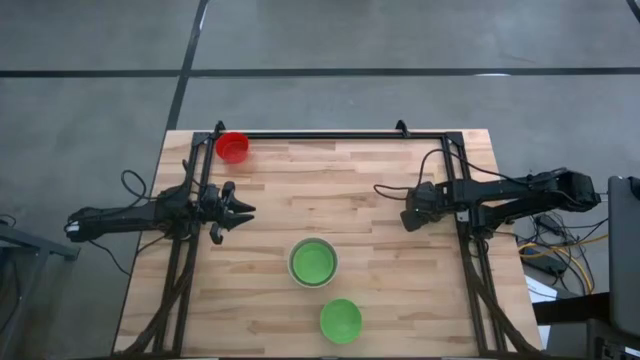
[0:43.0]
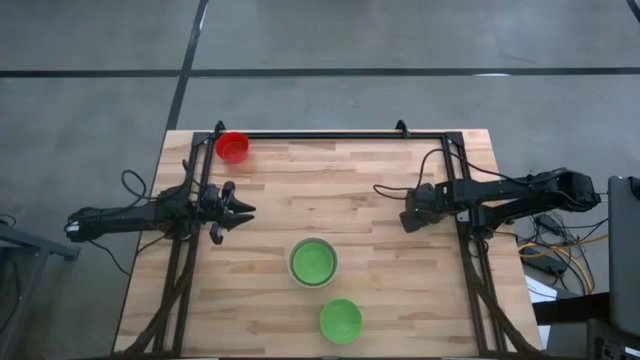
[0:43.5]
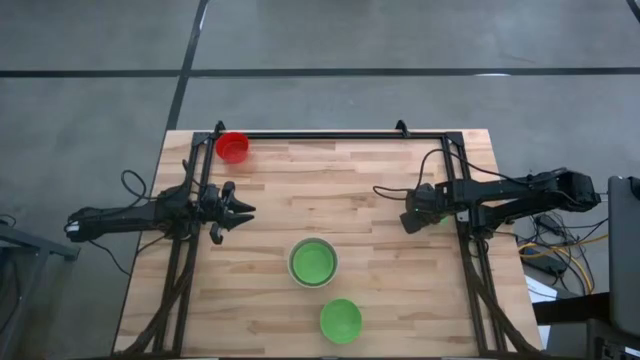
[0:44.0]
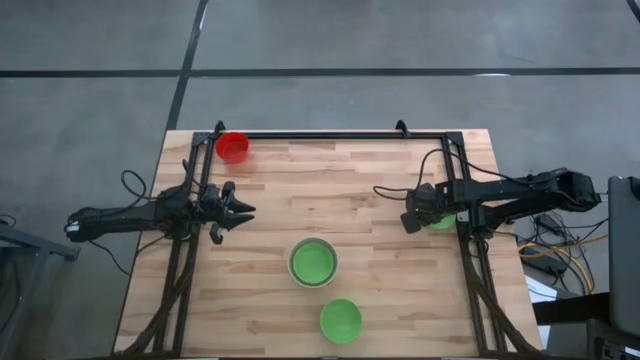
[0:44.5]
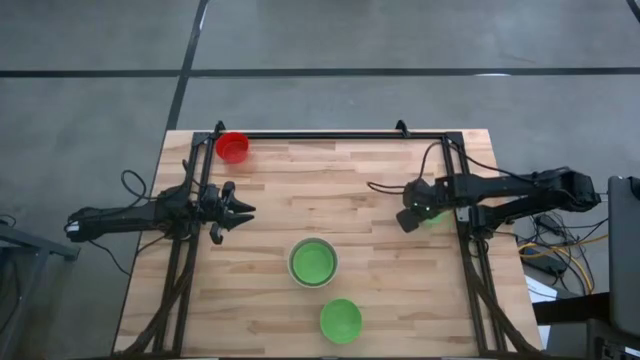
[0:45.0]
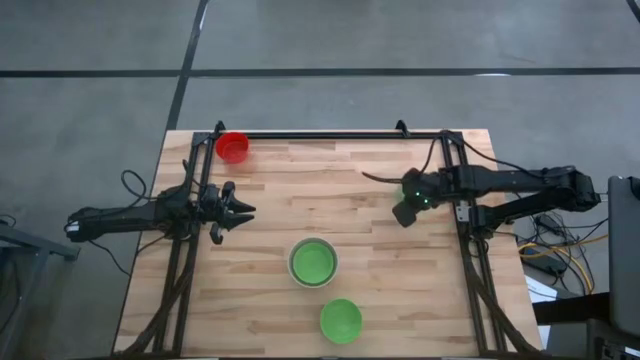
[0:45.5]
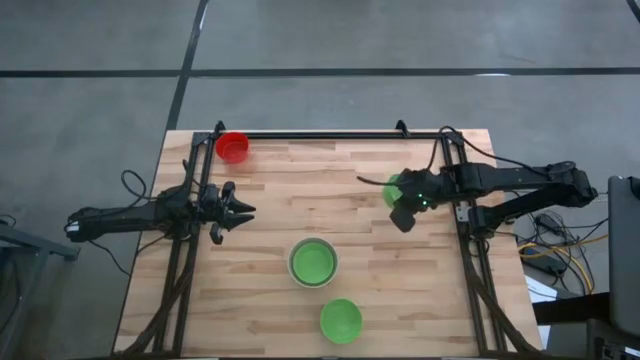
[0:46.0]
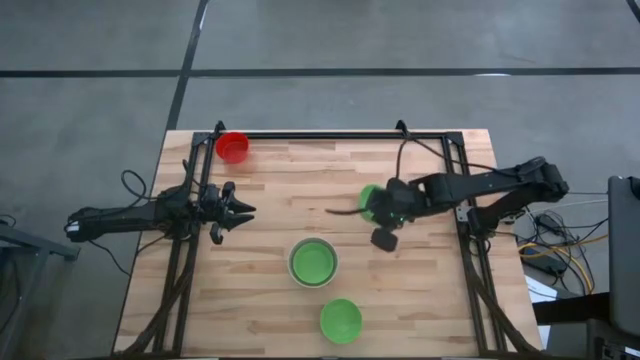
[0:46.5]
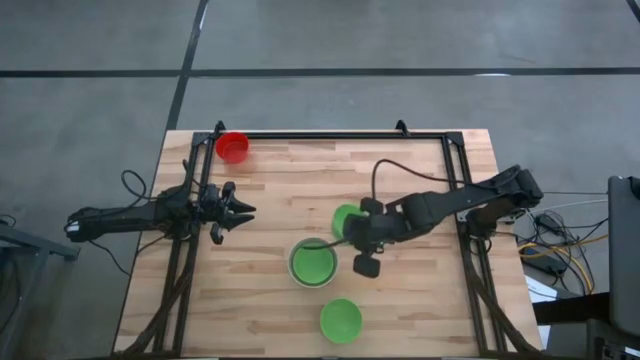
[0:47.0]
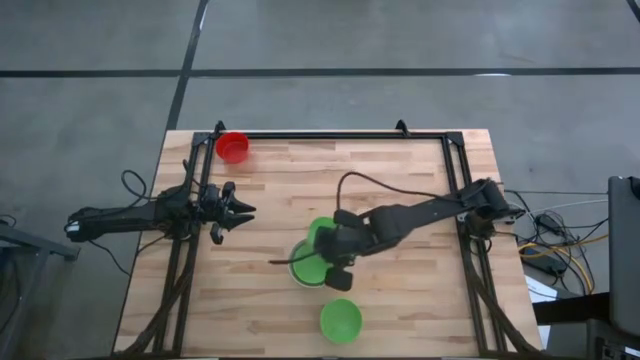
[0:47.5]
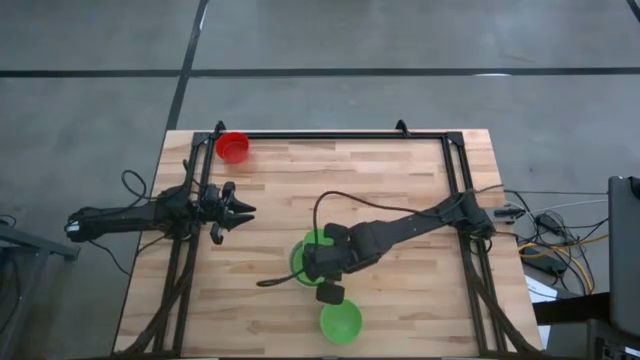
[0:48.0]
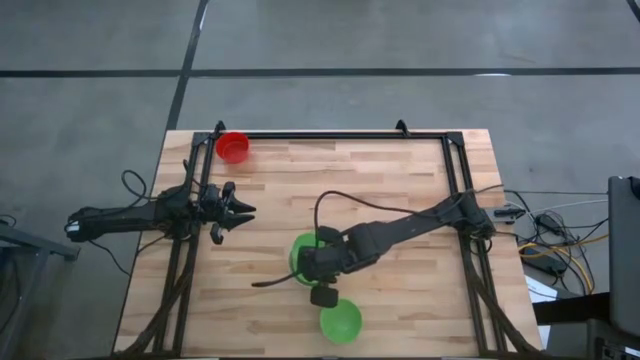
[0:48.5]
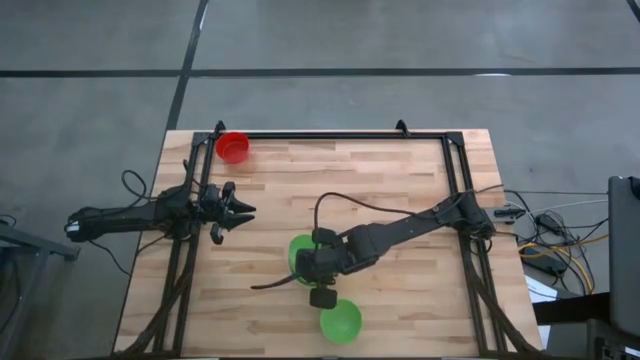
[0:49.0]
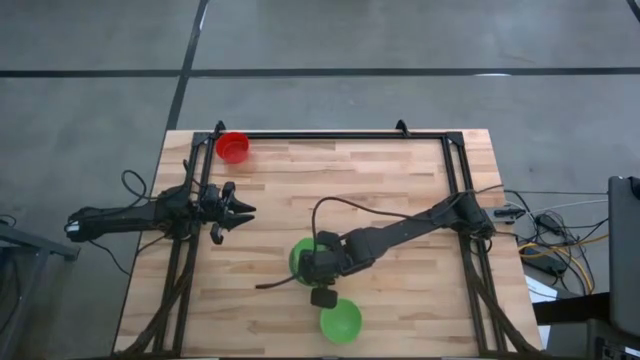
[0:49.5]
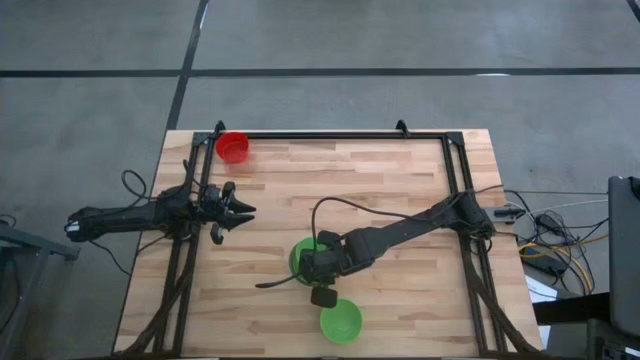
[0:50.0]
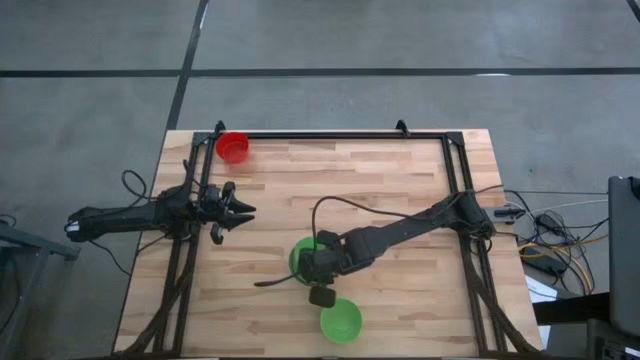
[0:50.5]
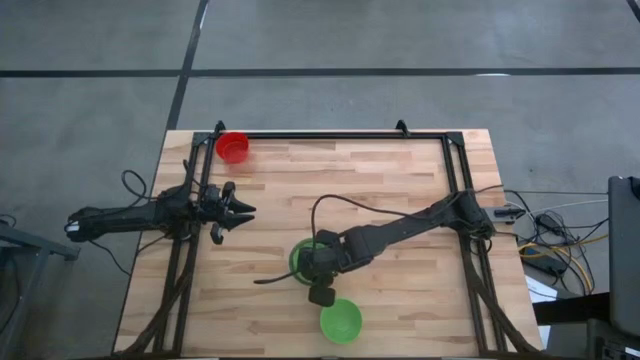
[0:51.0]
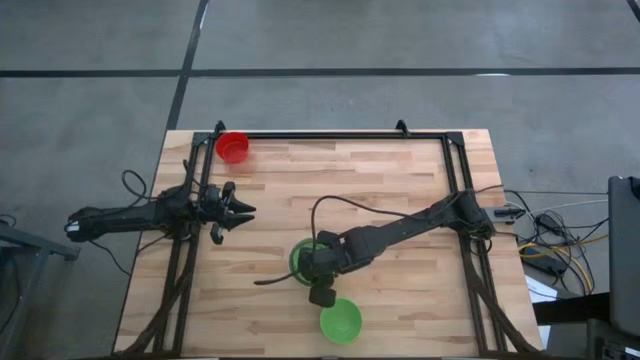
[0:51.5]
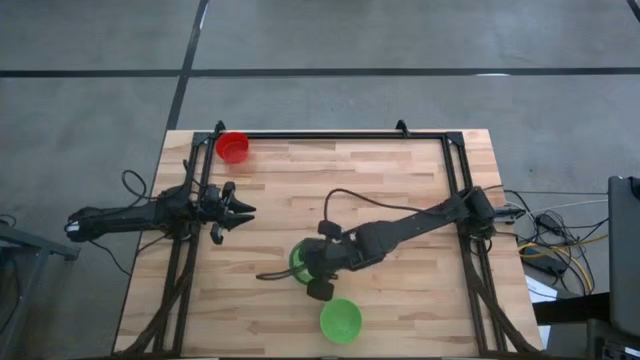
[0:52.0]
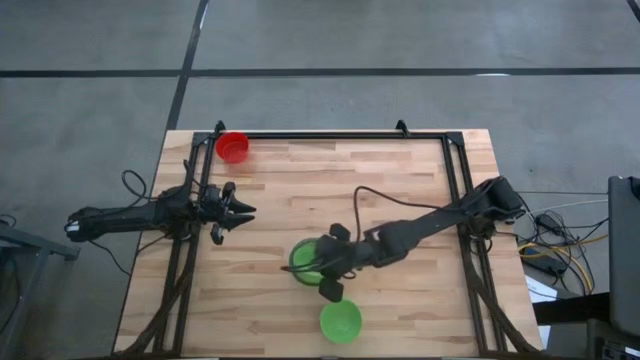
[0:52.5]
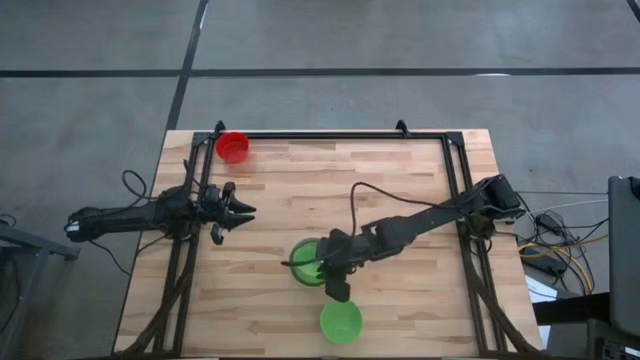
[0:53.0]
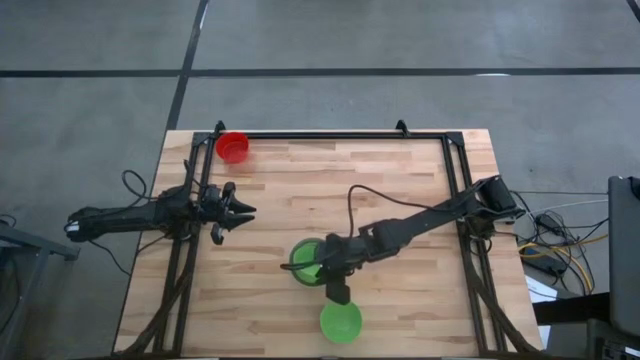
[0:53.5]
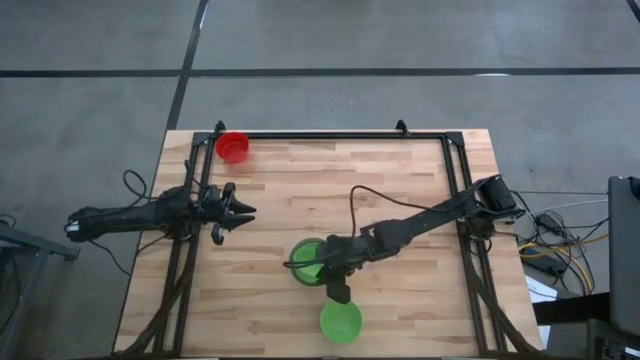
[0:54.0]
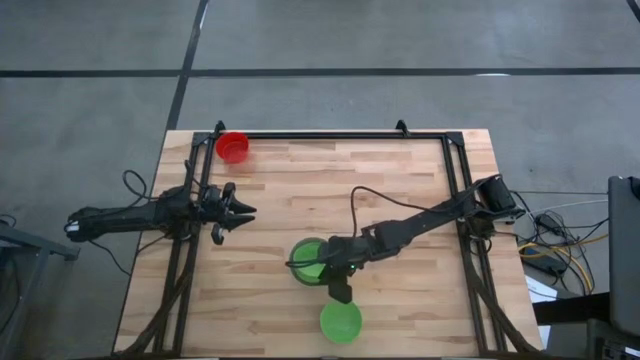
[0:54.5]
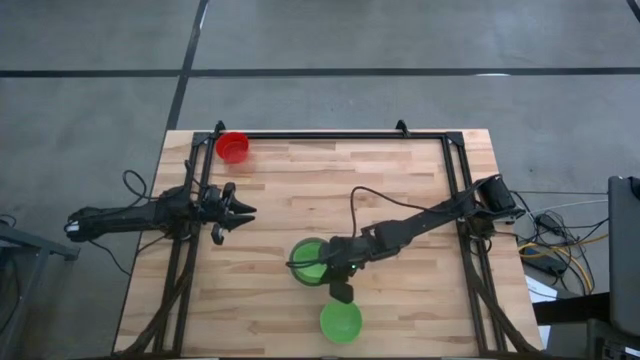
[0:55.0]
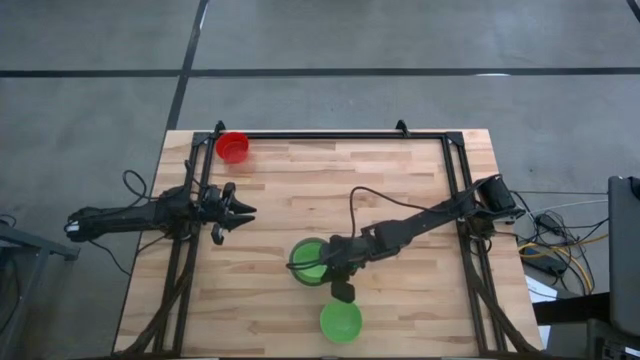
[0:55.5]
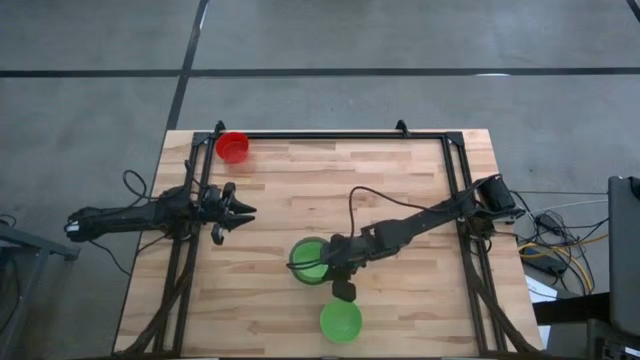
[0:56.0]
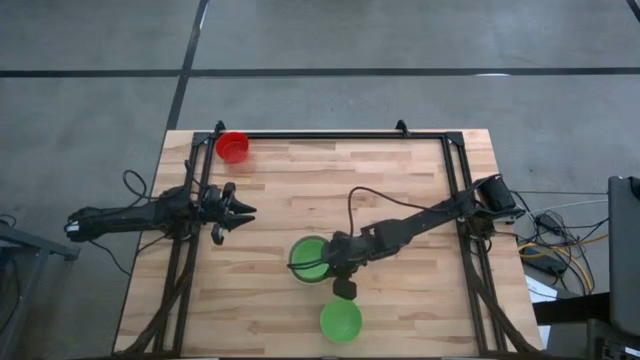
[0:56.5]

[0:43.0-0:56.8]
Stack the top green bowl on the green bowl
